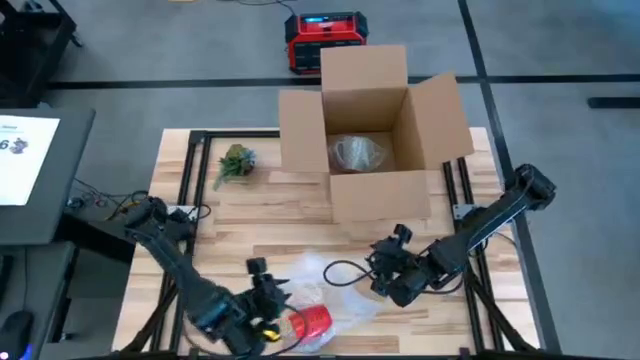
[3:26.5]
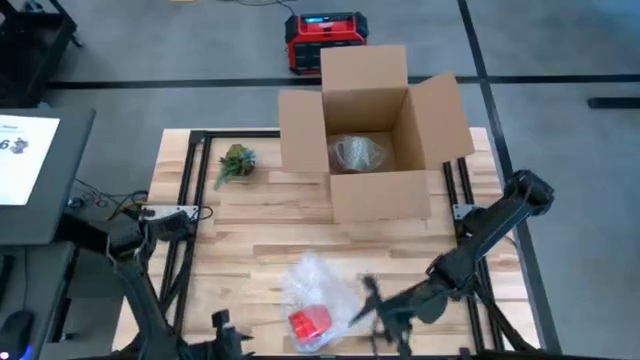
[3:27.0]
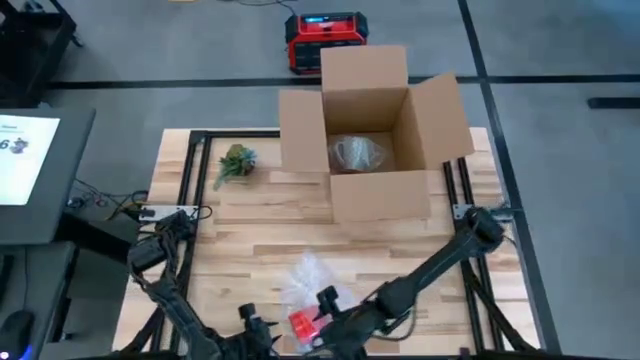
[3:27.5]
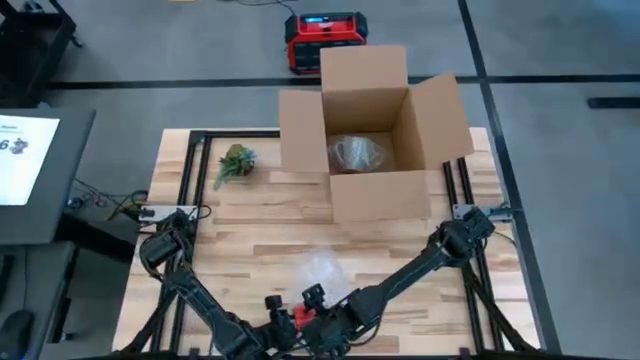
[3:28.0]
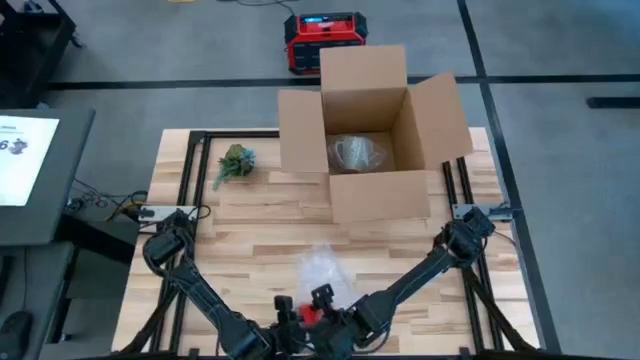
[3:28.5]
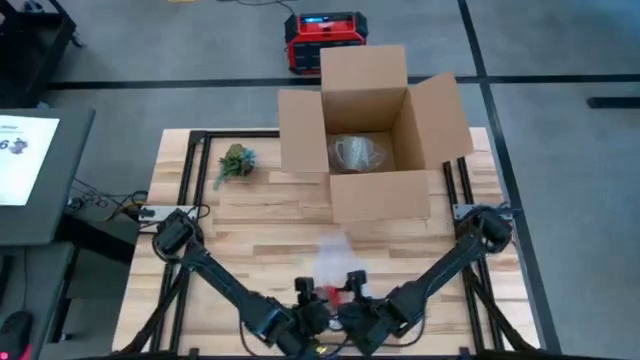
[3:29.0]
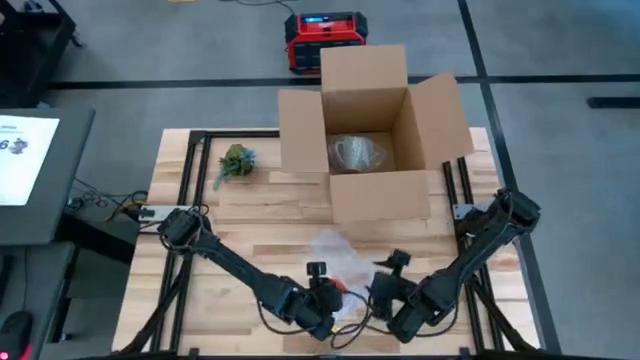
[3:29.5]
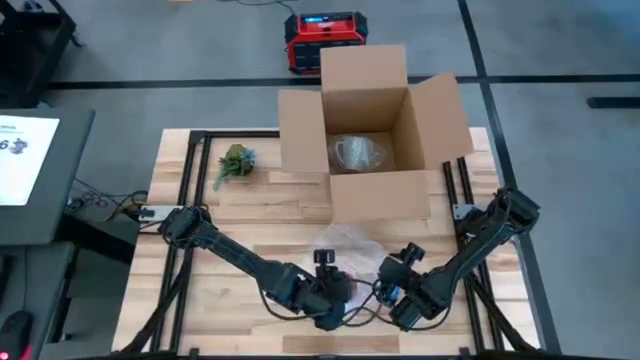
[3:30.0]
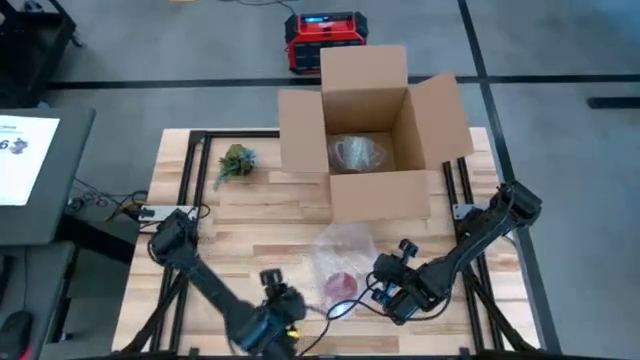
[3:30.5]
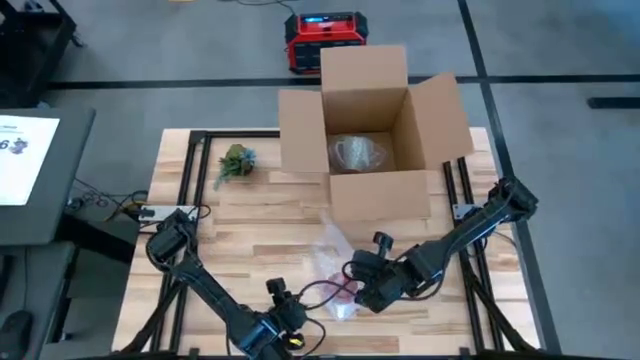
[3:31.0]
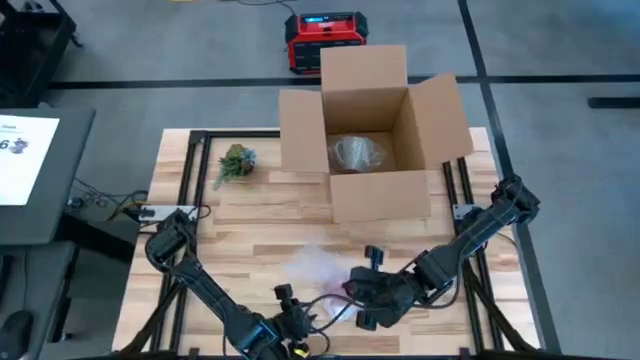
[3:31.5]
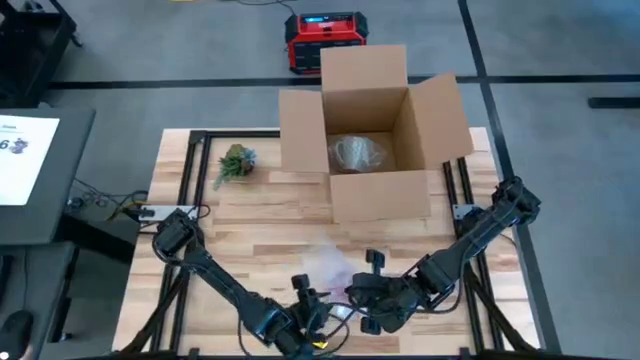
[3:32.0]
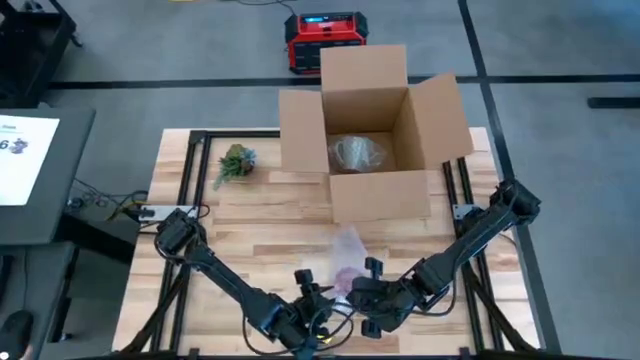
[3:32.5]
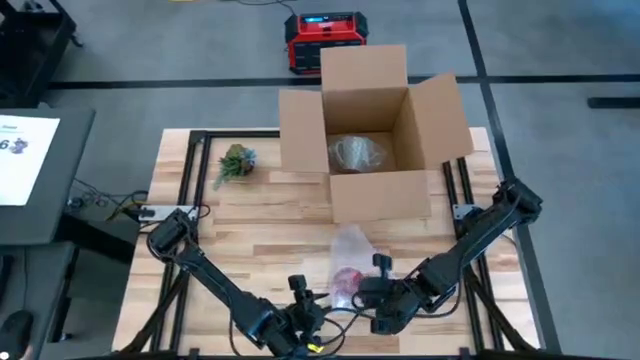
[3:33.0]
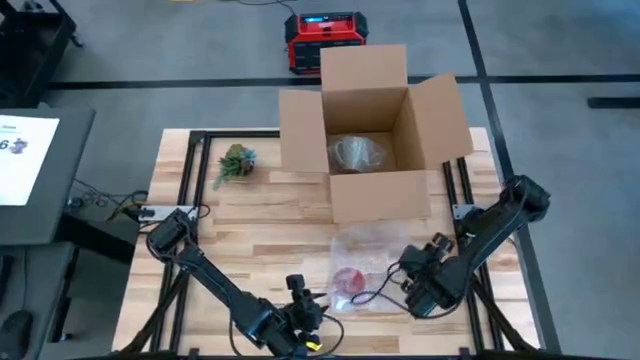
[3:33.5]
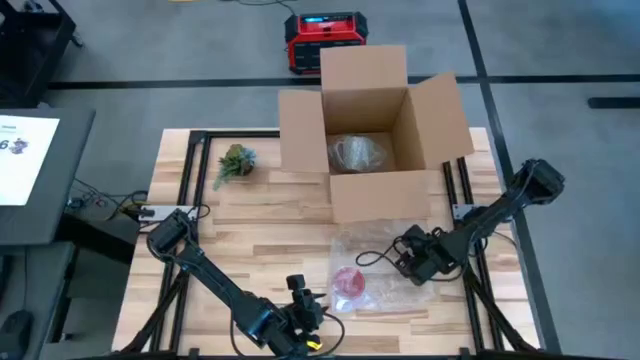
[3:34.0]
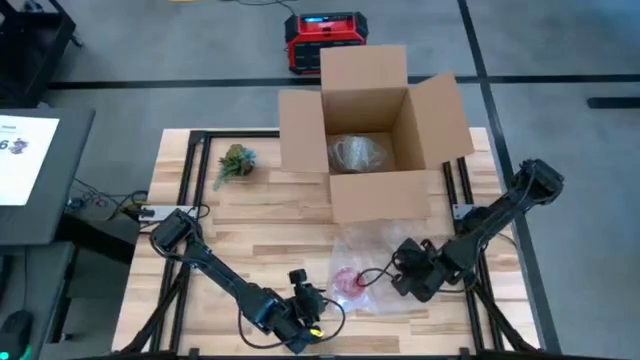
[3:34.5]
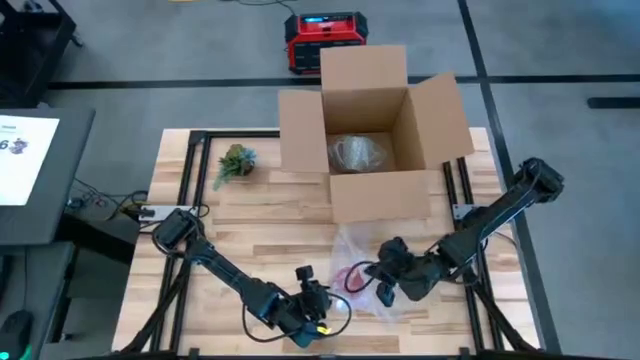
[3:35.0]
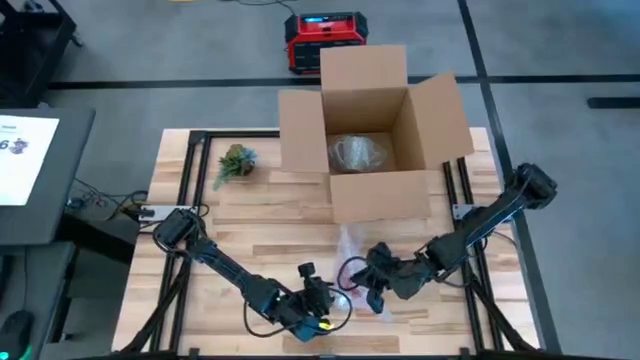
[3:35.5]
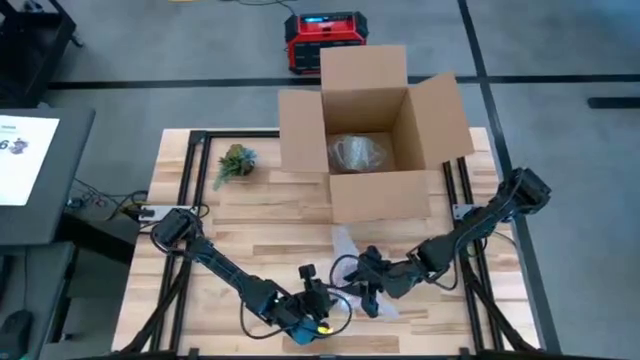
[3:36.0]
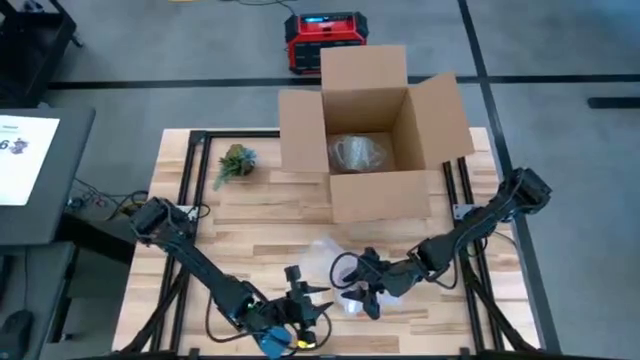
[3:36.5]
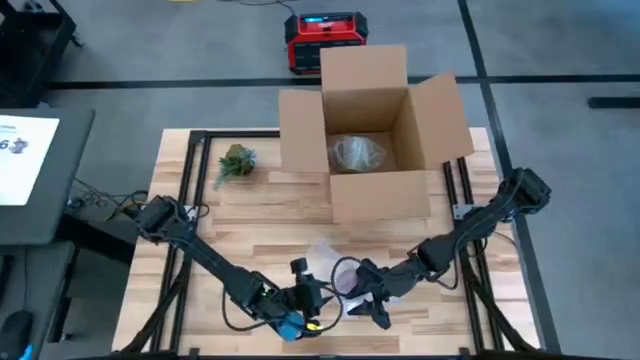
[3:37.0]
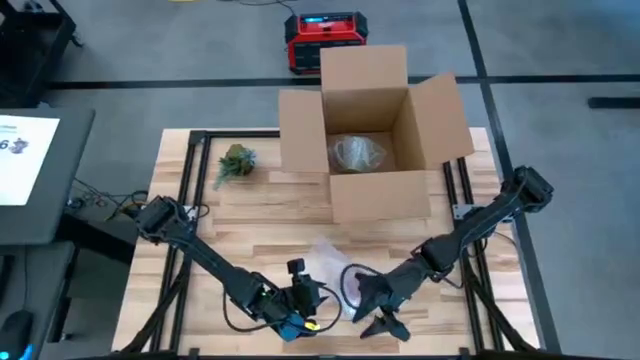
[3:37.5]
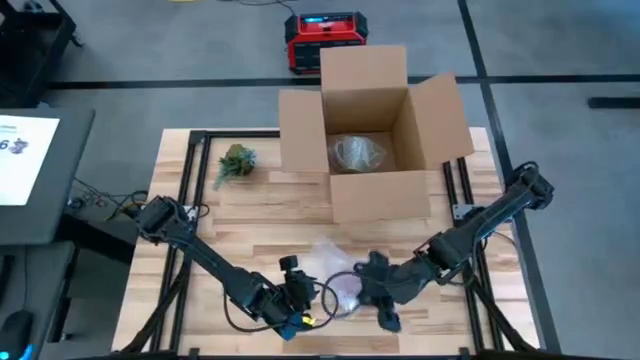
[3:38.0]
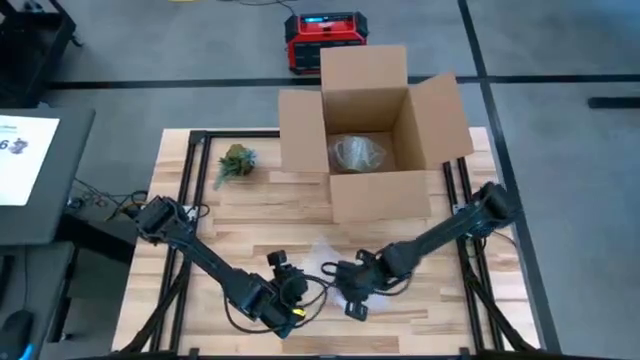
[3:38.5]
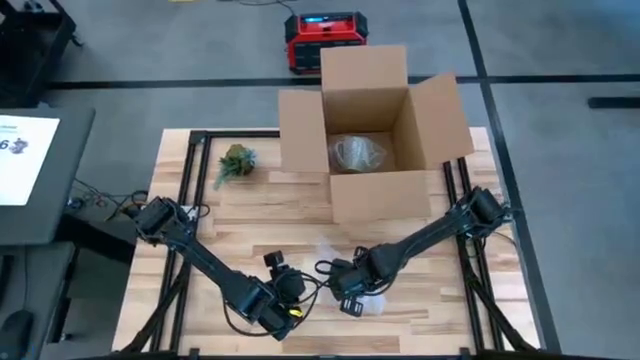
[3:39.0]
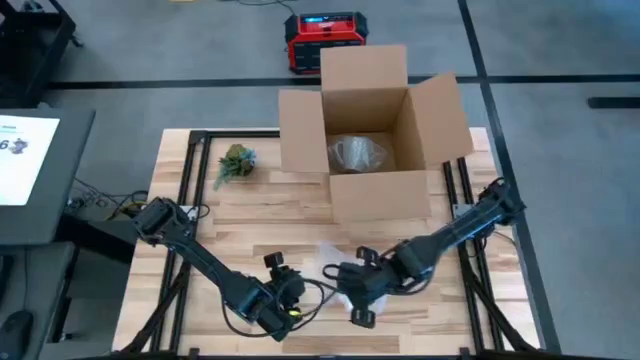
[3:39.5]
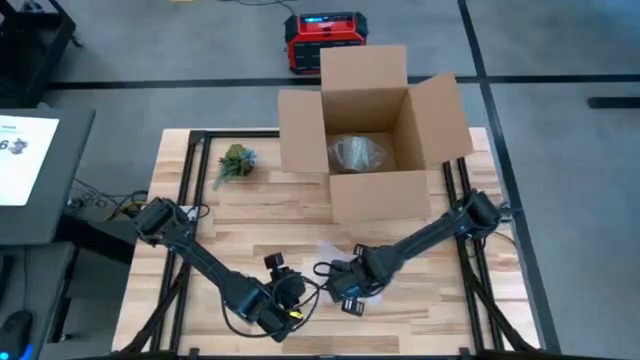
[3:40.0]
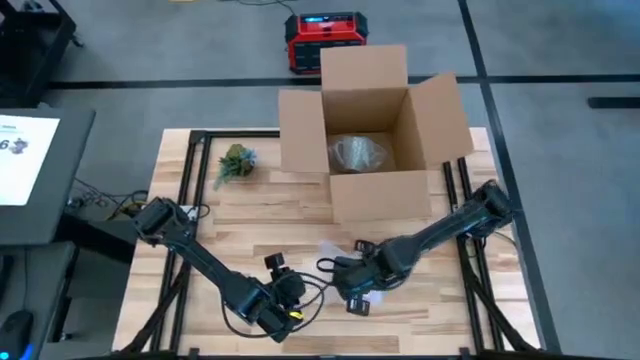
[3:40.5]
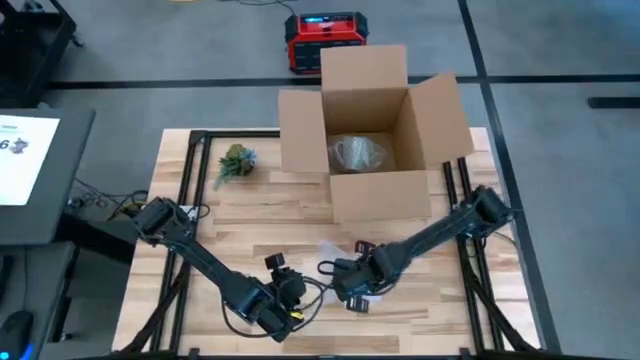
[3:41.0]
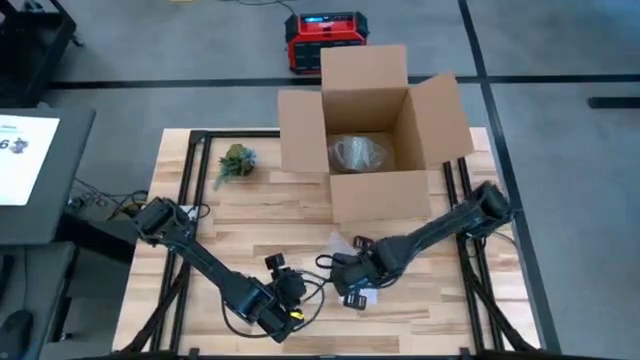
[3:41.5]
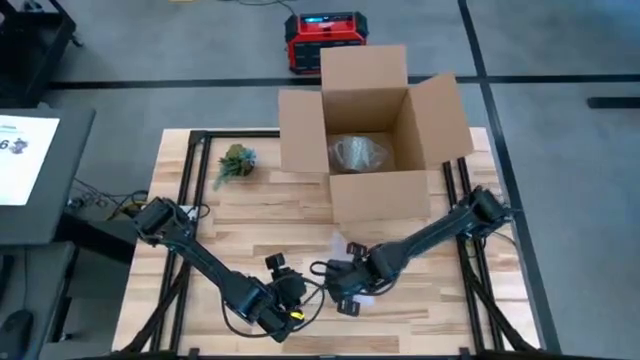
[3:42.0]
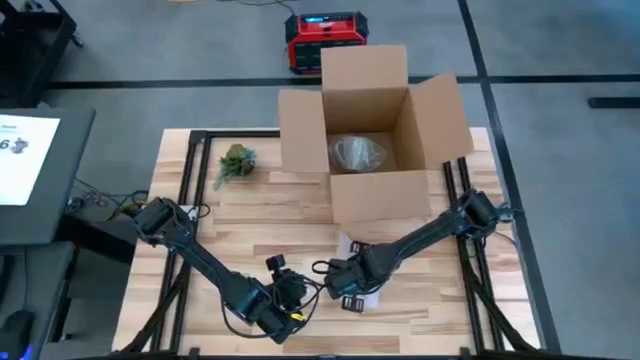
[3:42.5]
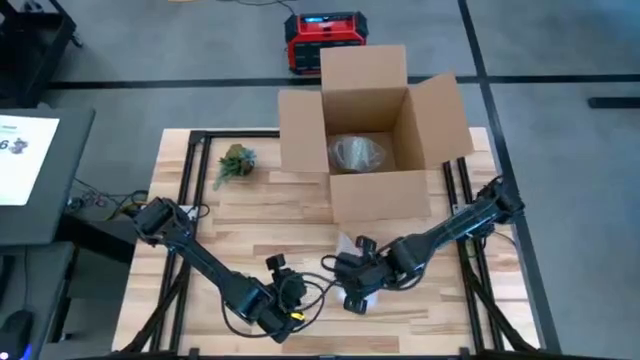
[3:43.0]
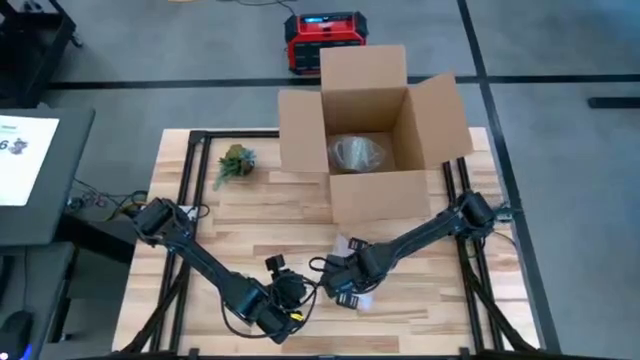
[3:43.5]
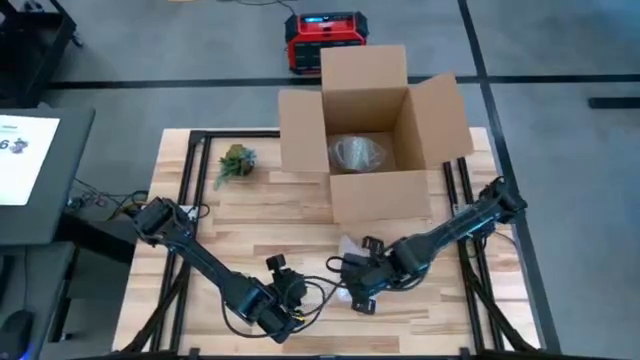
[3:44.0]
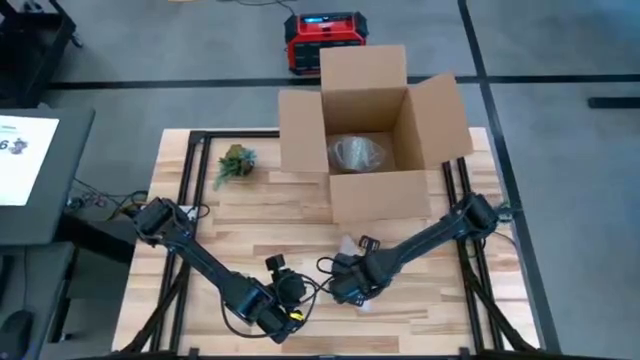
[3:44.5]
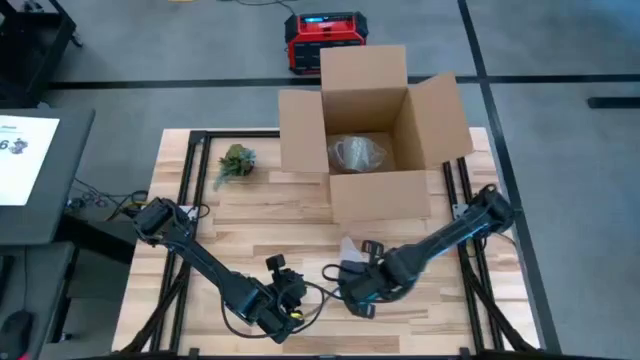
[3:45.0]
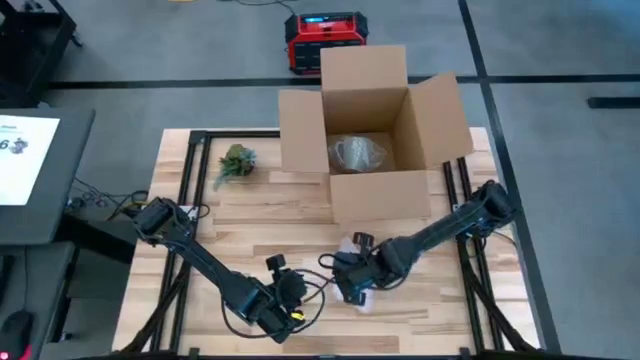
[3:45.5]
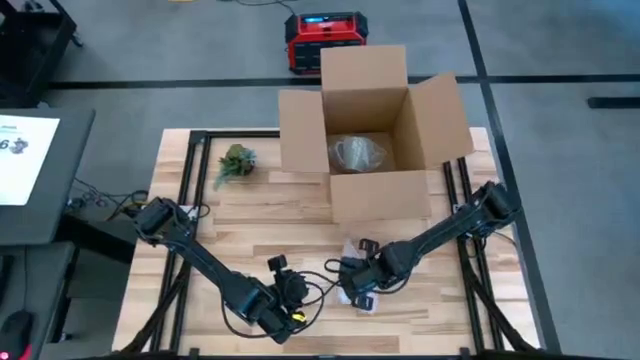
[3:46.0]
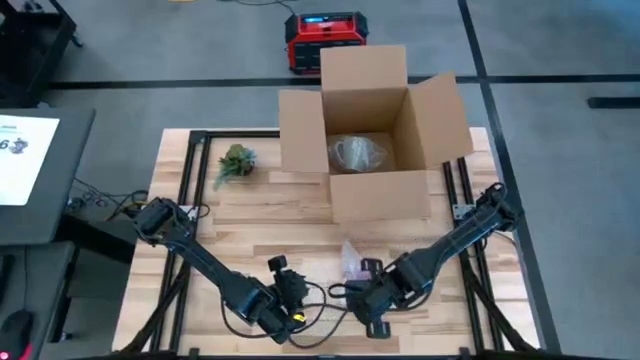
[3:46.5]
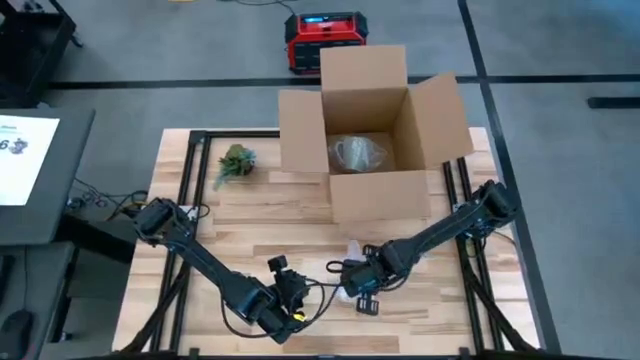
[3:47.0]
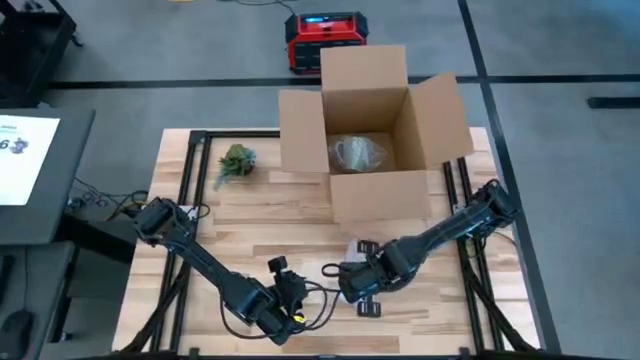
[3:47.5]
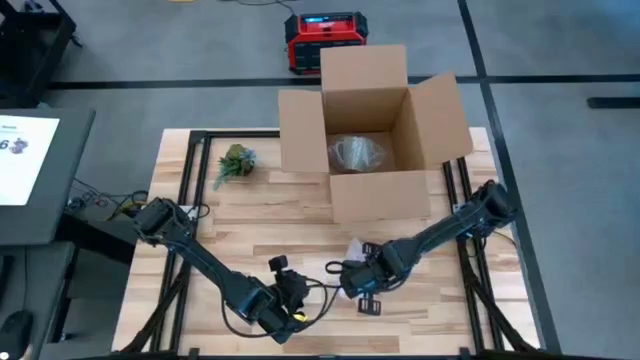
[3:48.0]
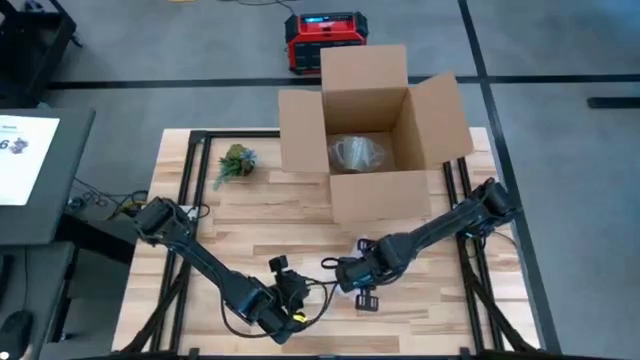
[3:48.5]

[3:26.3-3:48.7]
Task: wrap mug
Wrap the red mug with the transparent bubble wrap
